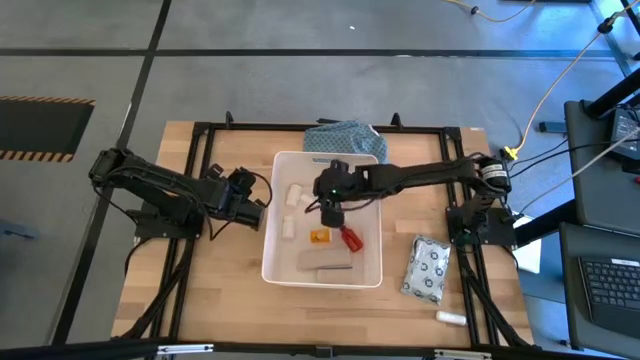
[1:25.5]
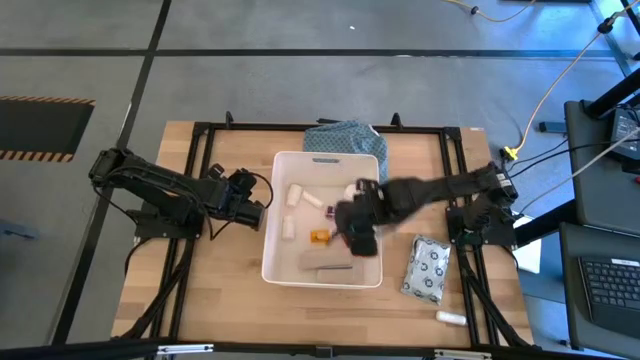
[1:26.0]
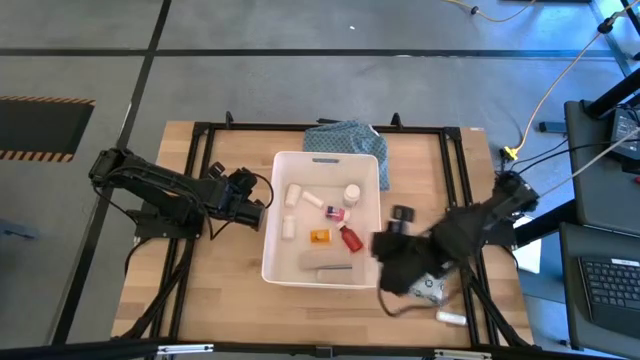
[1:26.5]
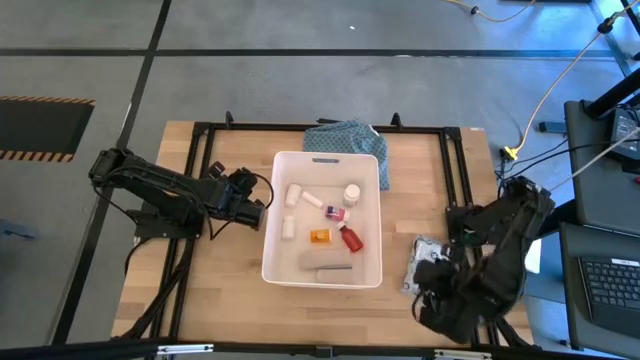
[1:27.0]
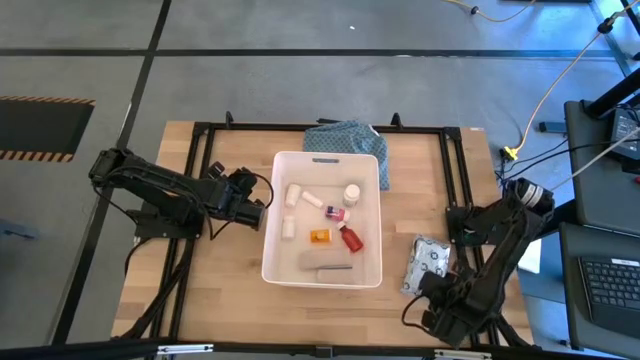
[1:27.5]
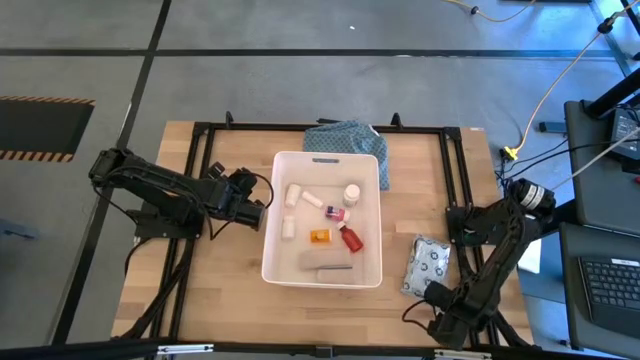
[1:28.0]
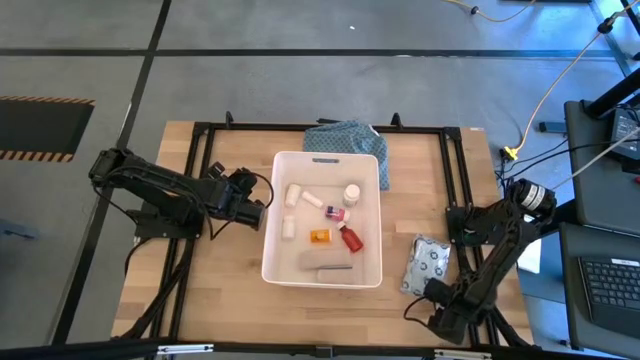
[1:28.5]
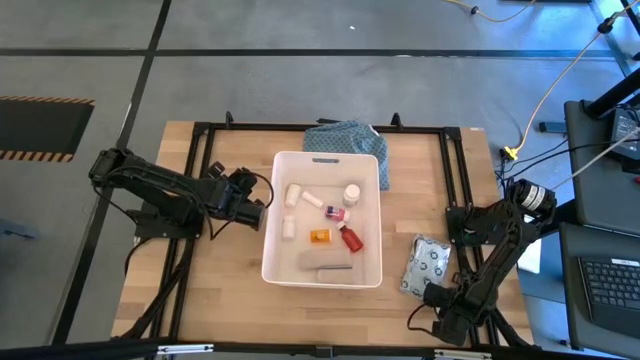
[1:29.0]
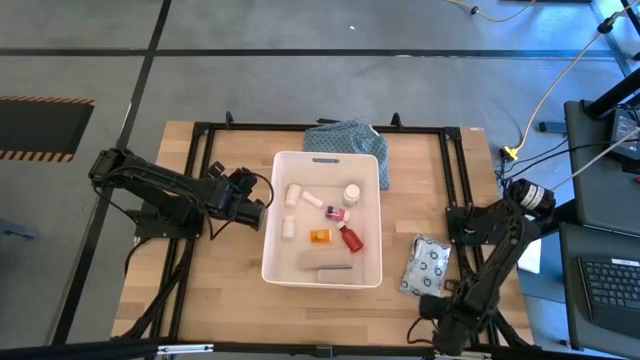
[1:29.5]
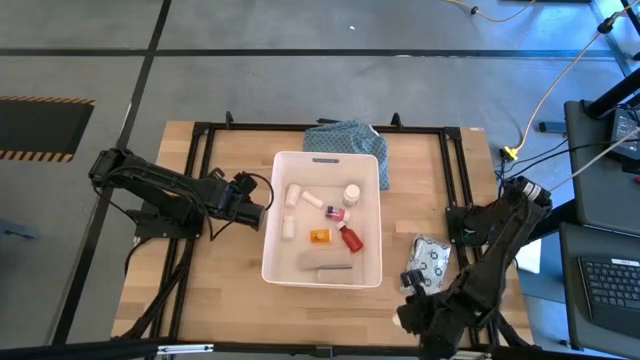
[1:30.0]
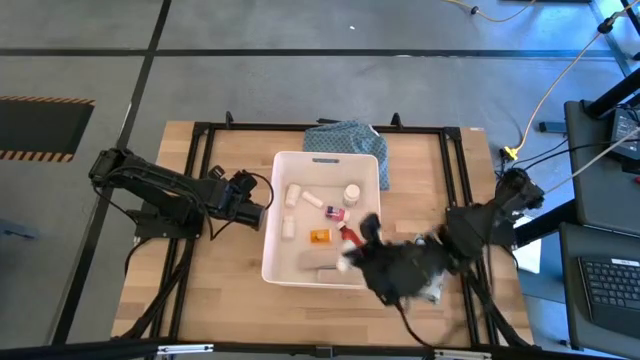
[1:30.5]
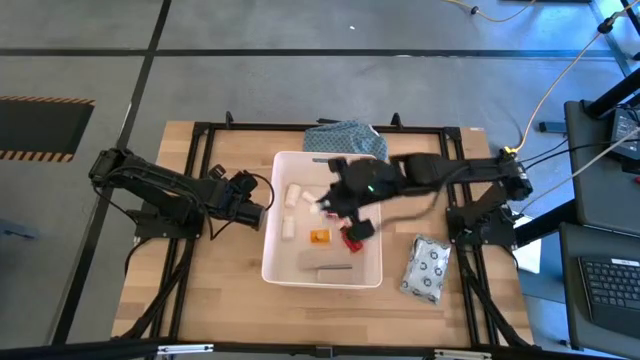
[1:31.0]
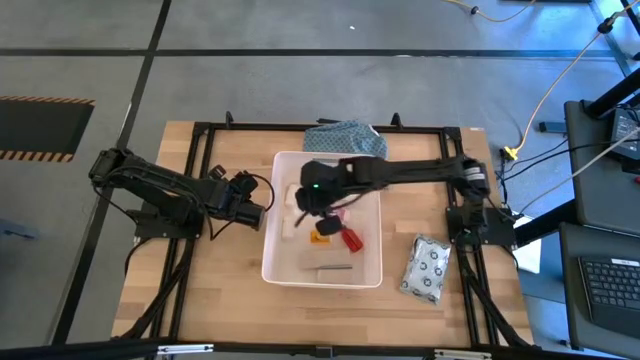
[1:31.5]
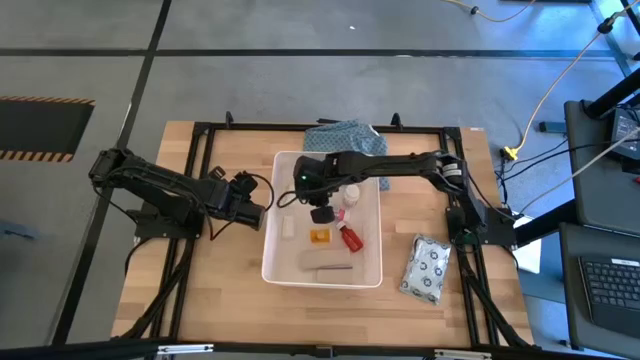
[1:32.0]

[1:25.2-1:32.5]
Task: Pick & place medical supplies in basket/bin
Put the white rolled gauze into the white bin

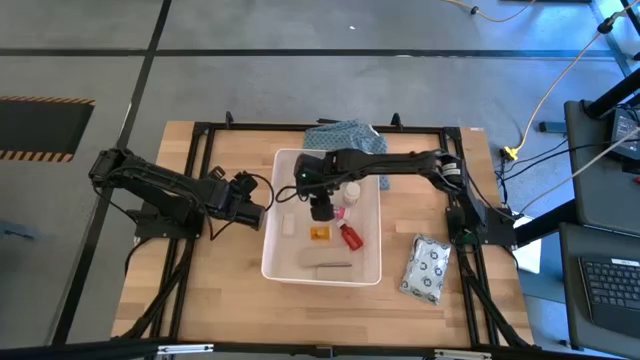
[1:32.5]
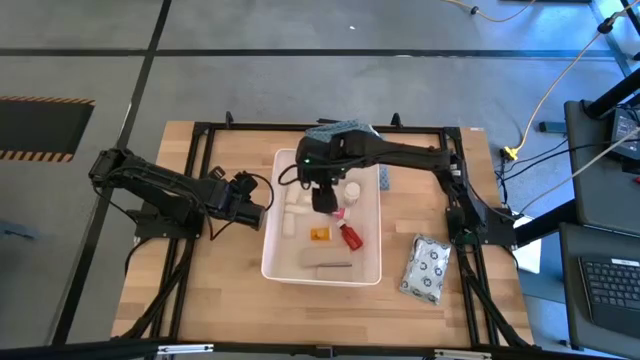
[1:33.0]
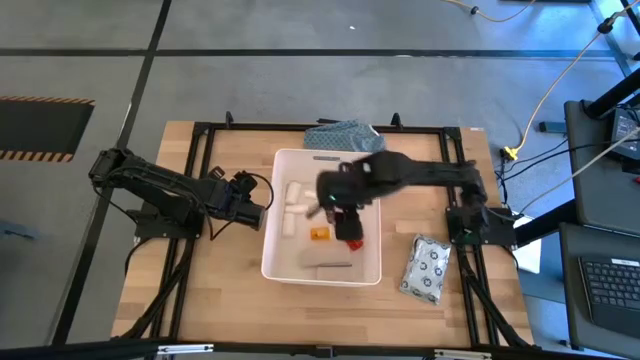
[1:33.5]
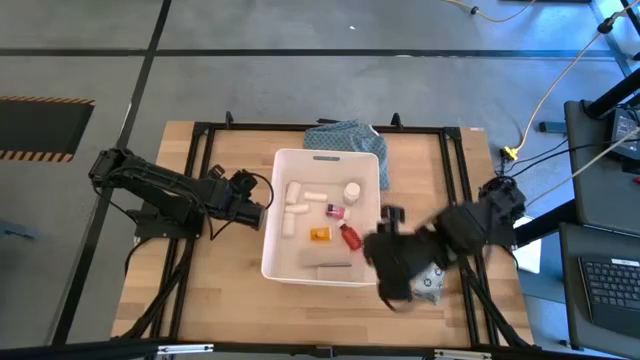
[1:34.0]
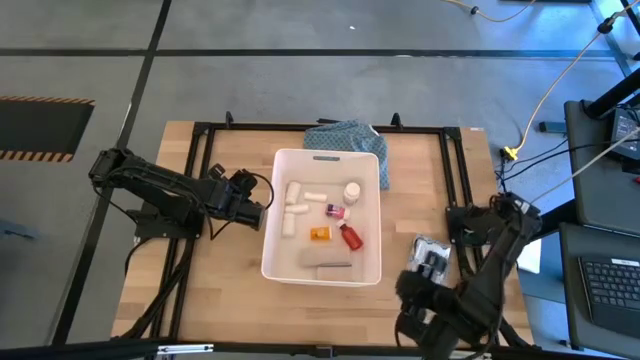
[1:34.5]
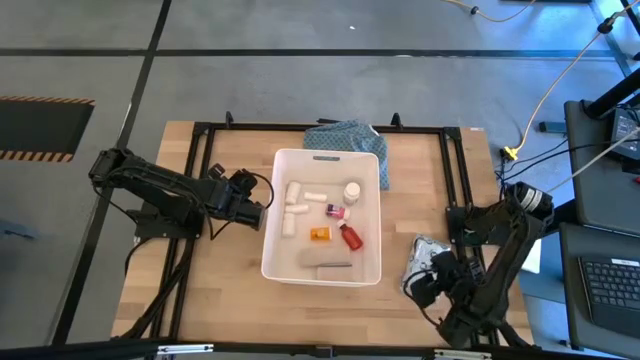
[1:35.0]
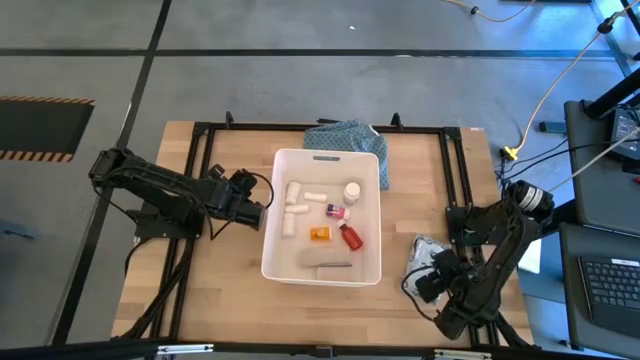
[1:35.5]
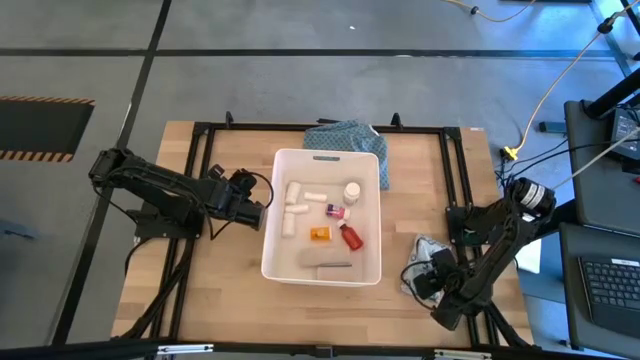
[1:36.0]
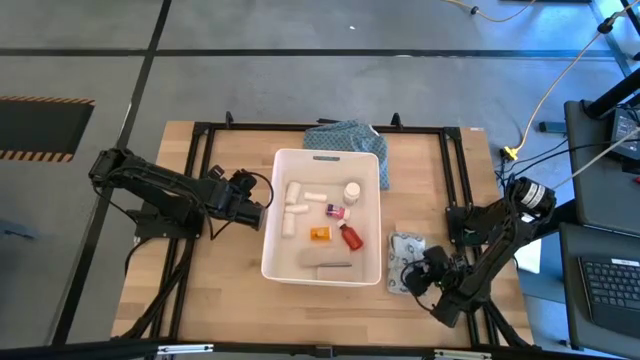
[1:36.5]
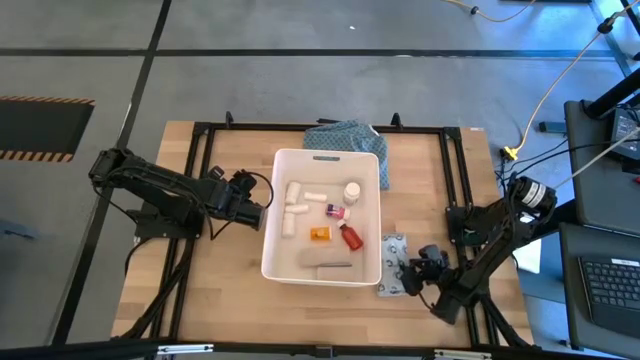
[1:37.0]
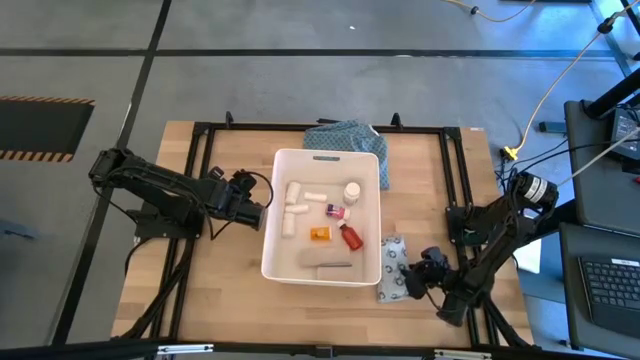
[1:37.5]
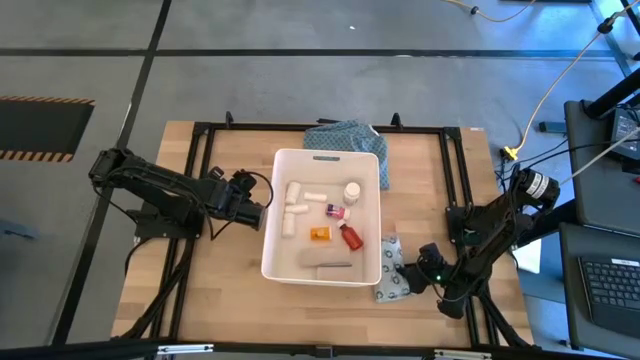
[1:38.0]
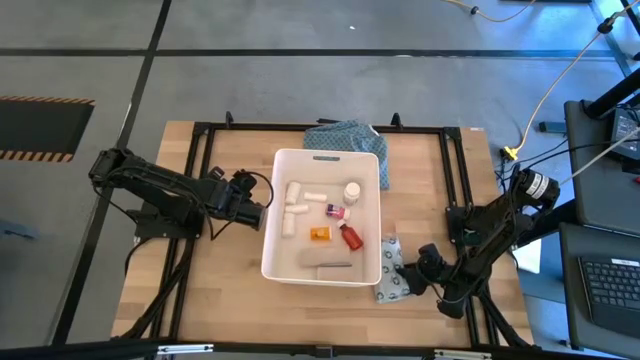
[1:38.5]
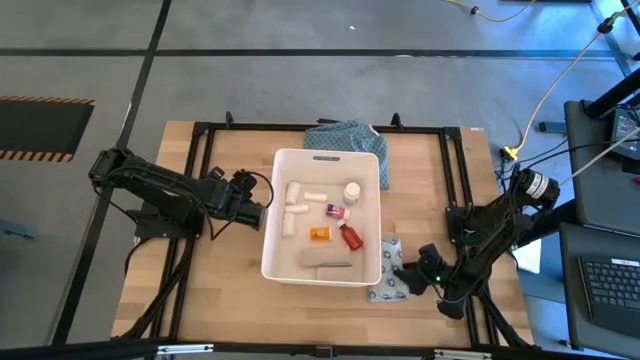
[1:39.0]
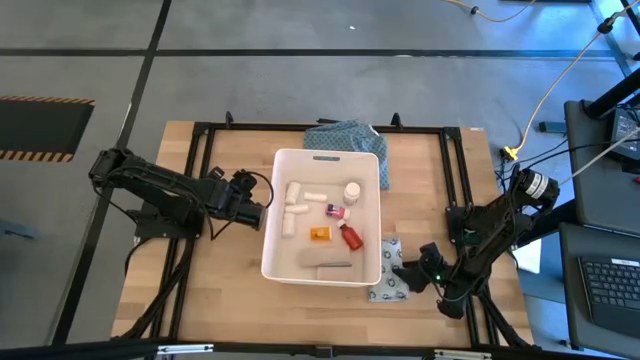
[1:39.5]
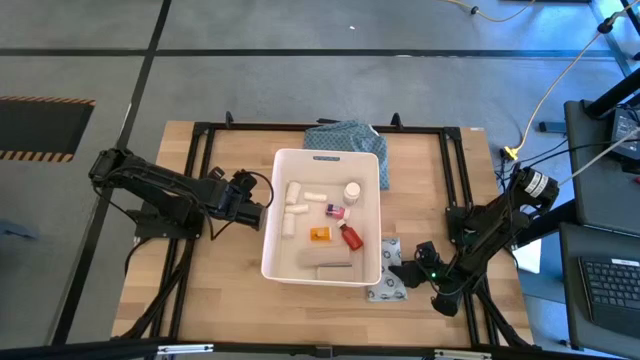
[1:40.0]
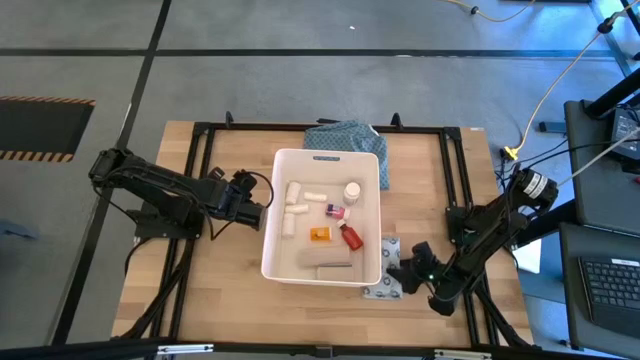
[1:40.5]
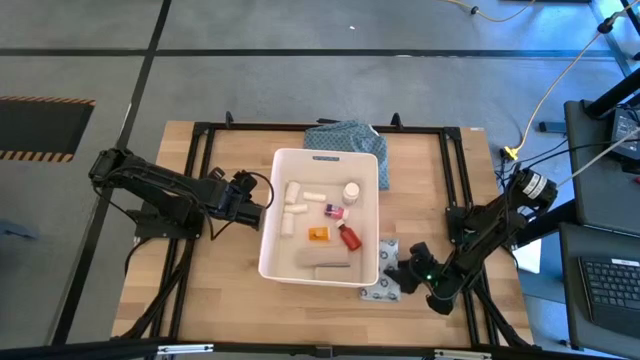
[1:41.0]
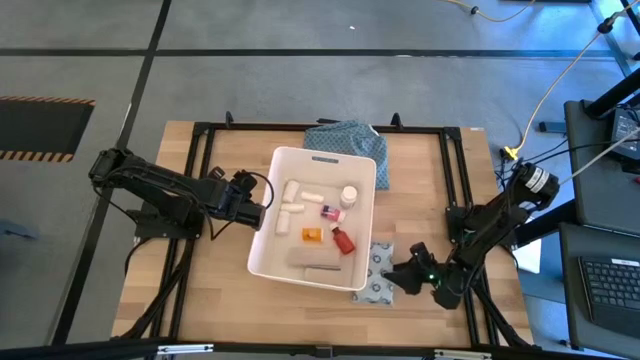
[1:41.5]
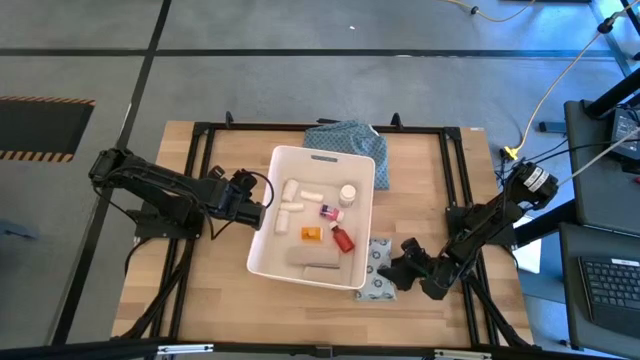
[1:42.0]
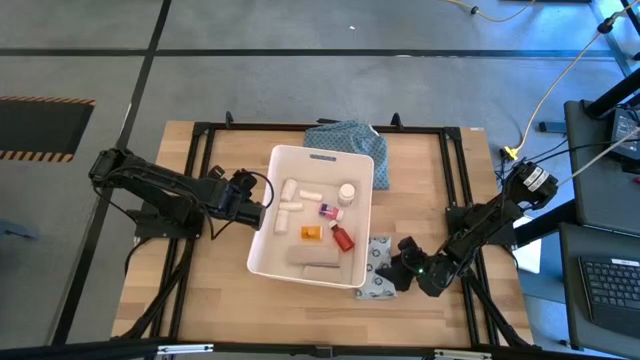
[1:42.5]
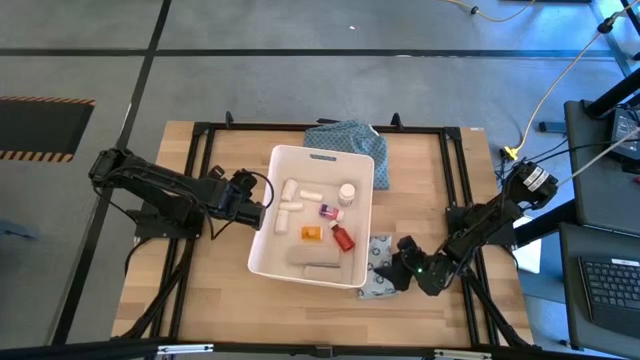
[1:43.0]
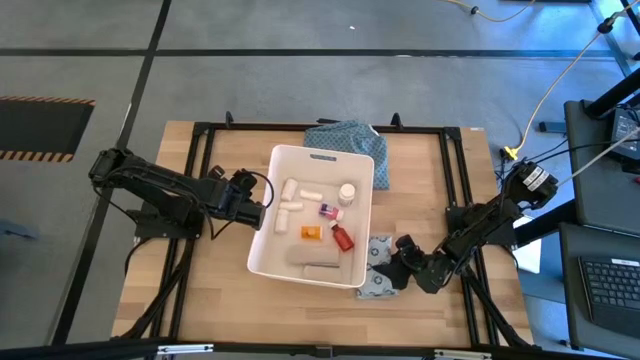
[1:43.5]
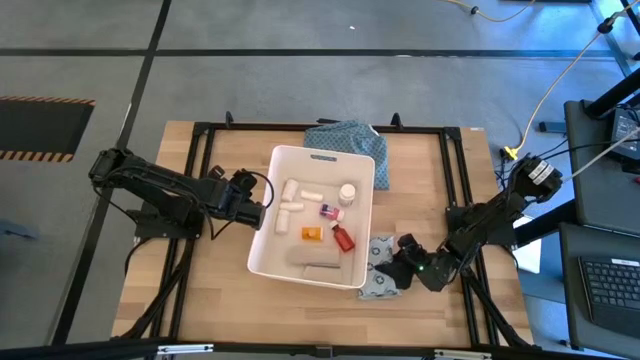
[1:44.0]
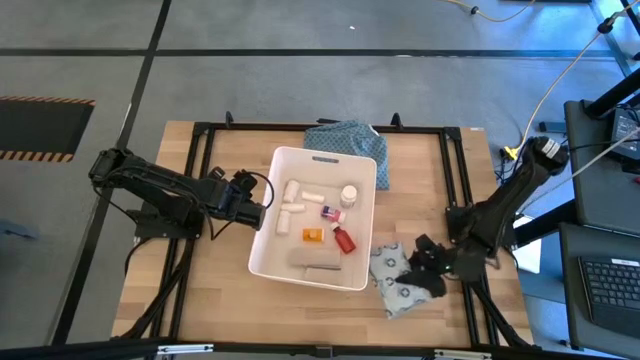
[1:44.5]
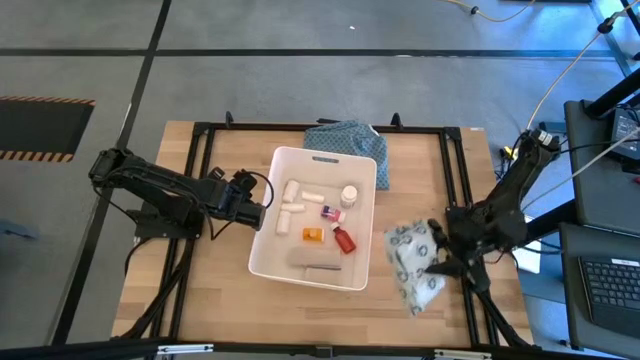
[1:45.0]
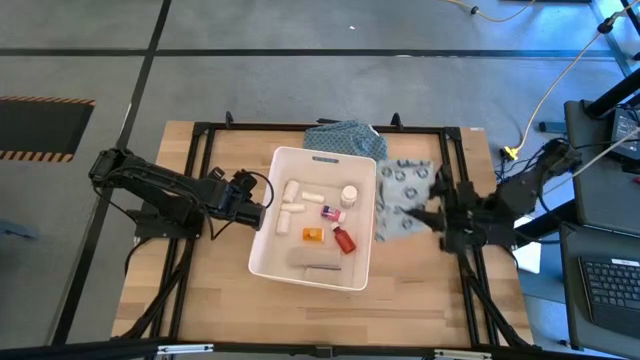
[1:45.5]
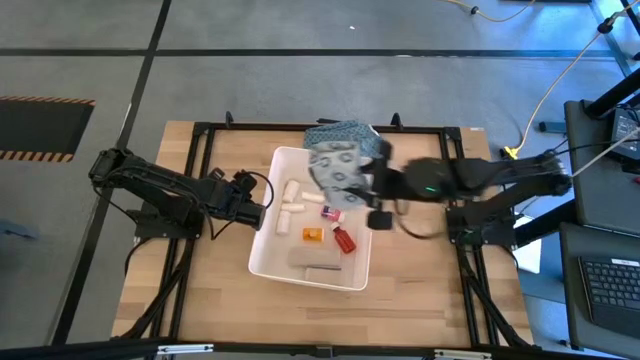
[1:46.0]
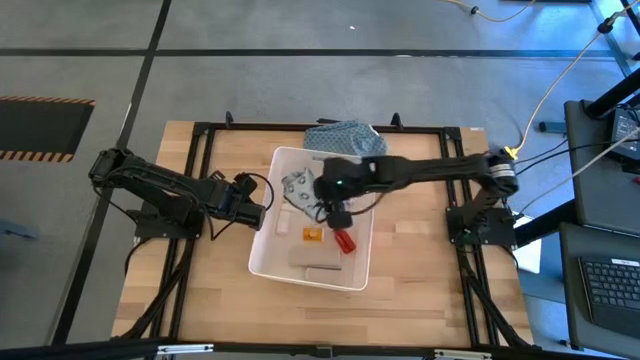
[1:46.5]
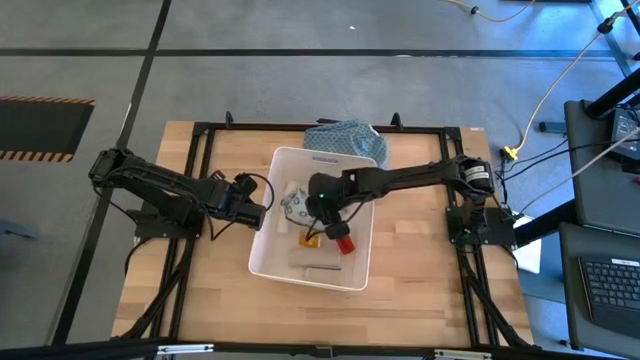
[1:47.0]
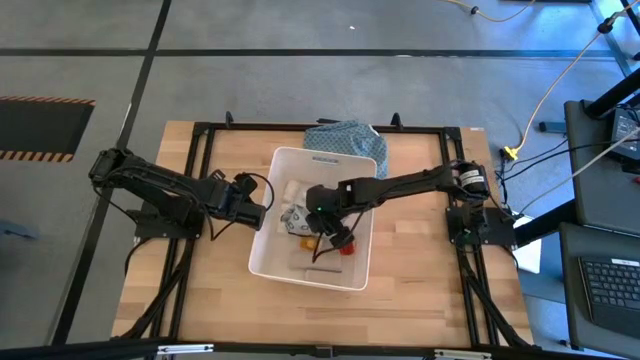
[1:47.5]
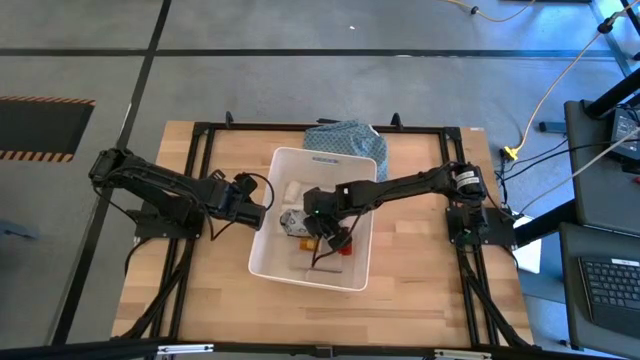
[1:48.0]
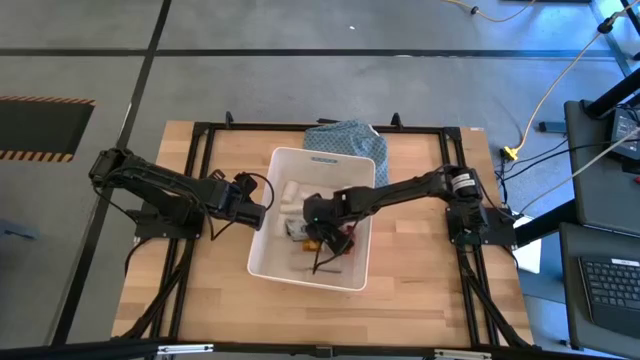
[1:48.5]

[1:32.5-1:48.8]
Put the light blue mailer bag into the white bin
